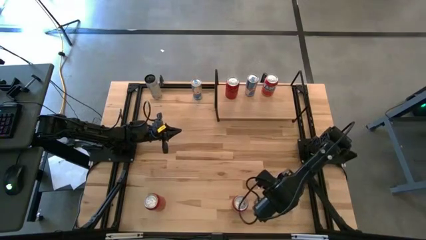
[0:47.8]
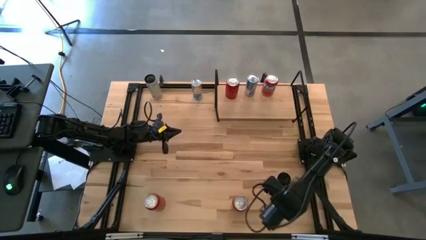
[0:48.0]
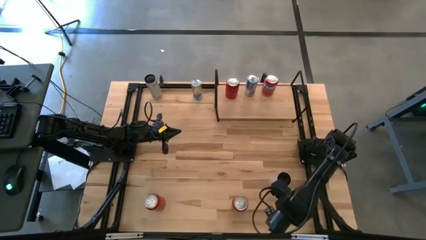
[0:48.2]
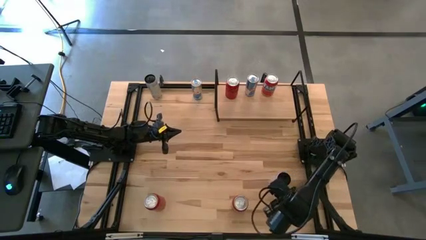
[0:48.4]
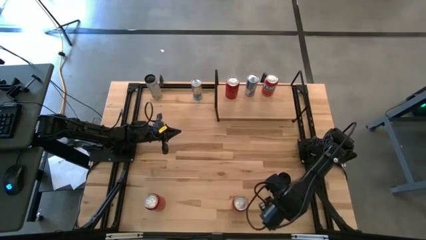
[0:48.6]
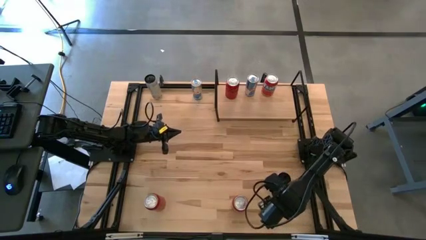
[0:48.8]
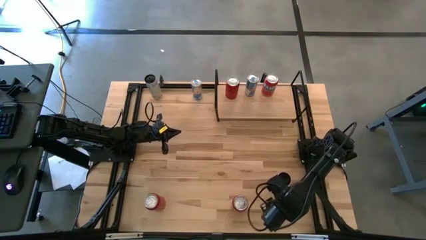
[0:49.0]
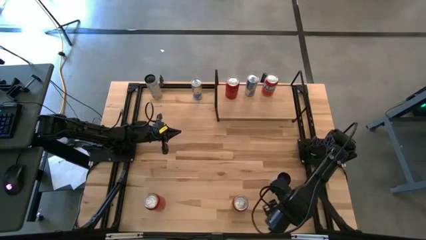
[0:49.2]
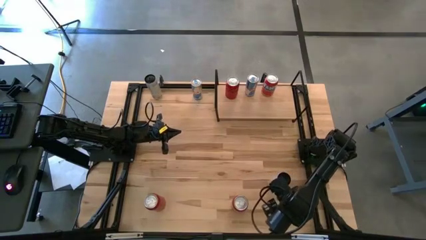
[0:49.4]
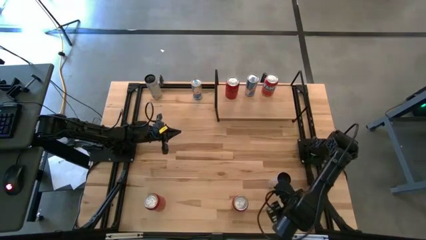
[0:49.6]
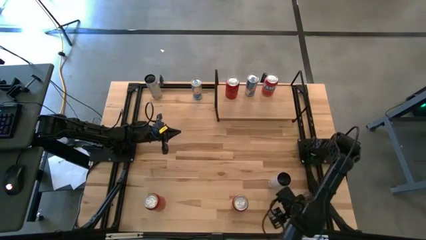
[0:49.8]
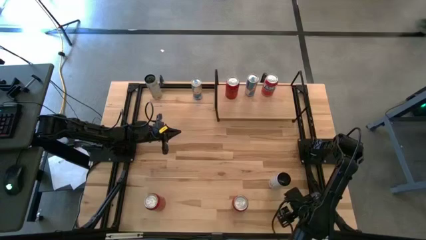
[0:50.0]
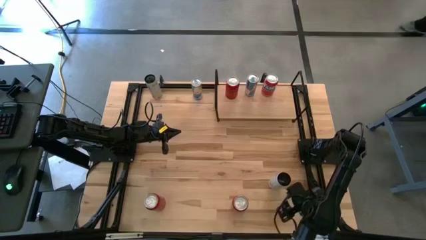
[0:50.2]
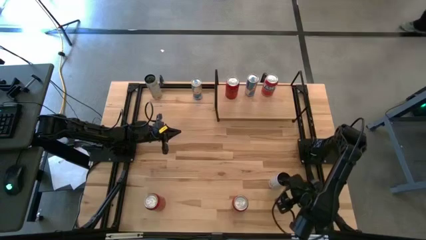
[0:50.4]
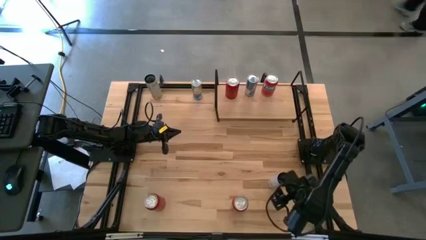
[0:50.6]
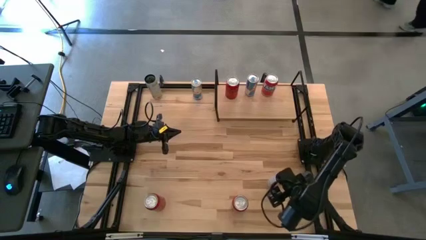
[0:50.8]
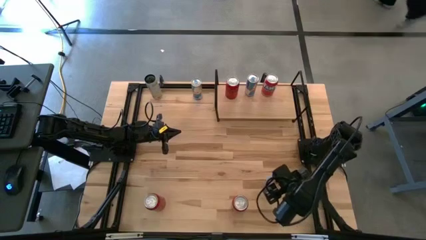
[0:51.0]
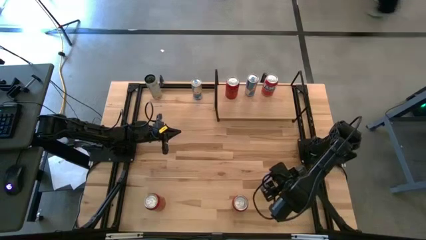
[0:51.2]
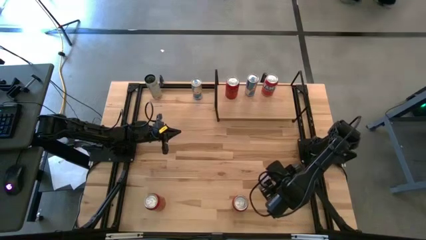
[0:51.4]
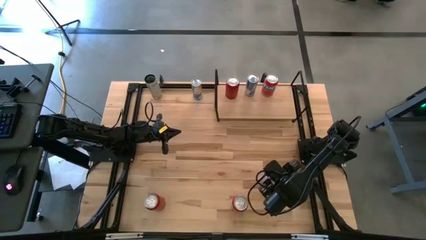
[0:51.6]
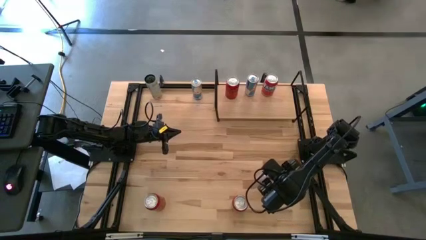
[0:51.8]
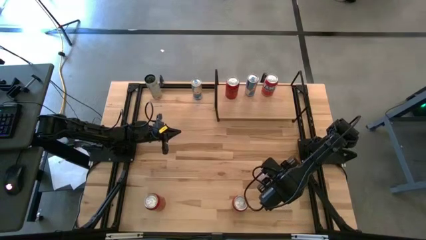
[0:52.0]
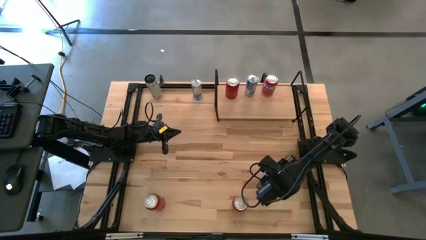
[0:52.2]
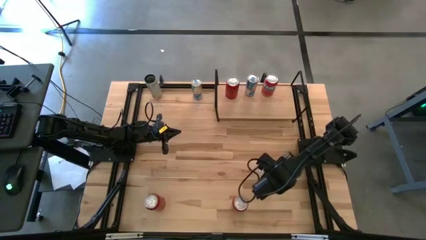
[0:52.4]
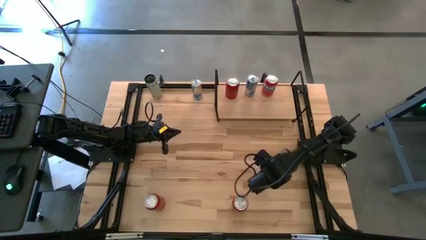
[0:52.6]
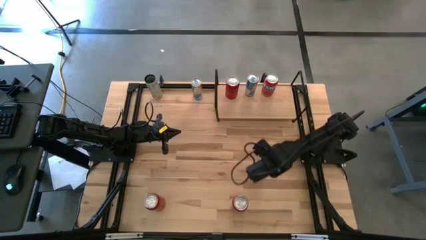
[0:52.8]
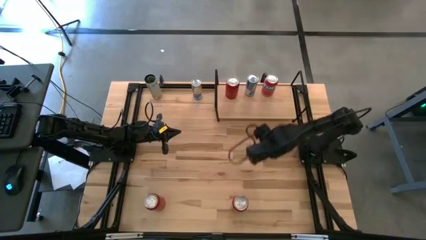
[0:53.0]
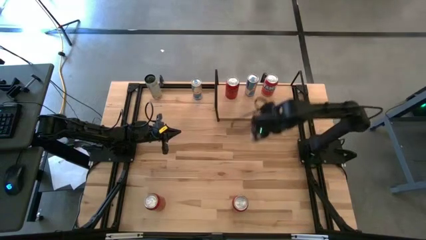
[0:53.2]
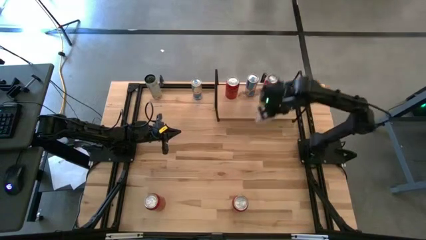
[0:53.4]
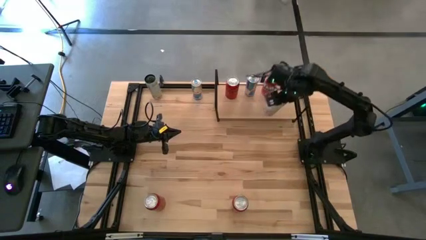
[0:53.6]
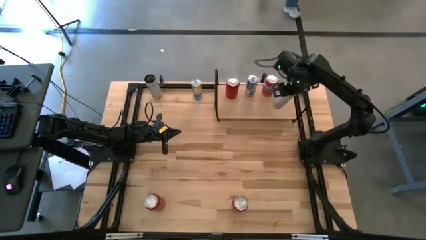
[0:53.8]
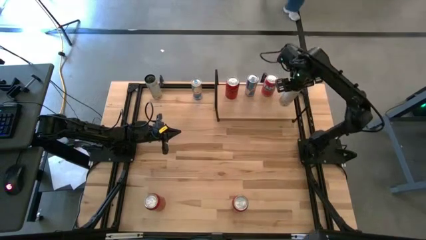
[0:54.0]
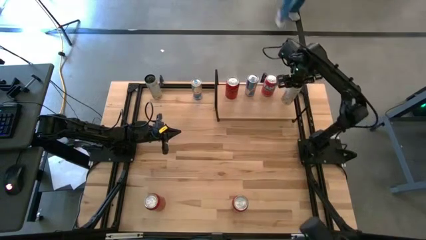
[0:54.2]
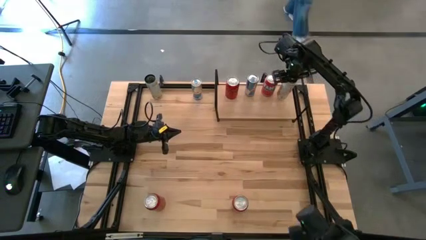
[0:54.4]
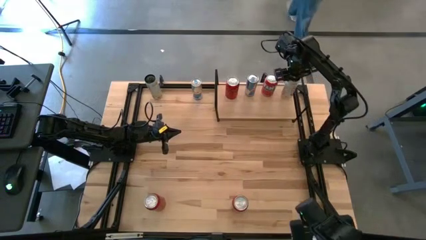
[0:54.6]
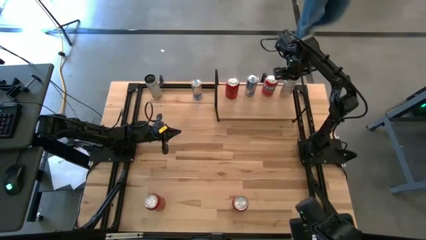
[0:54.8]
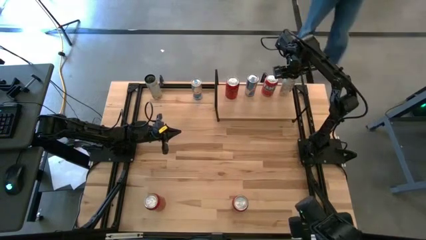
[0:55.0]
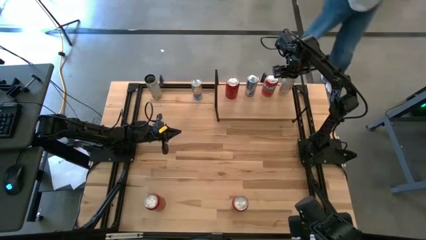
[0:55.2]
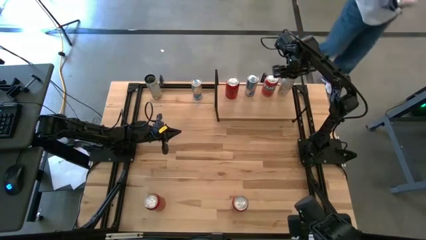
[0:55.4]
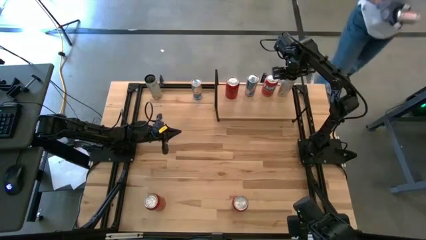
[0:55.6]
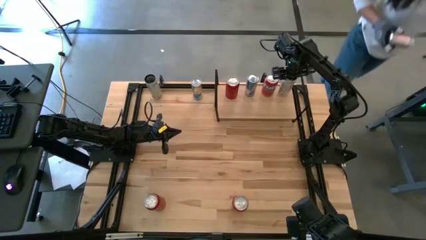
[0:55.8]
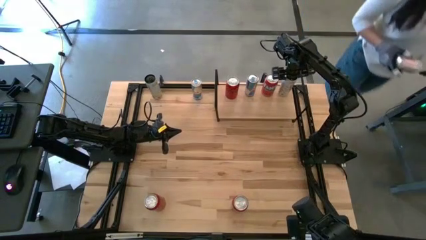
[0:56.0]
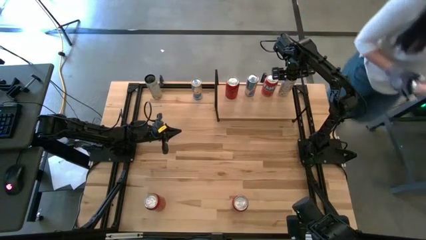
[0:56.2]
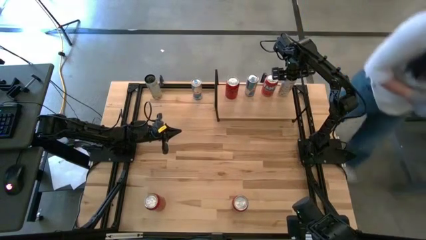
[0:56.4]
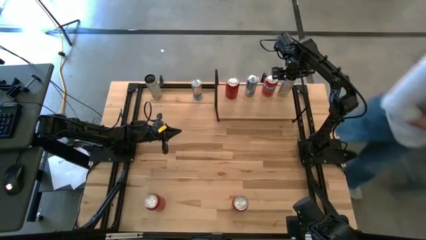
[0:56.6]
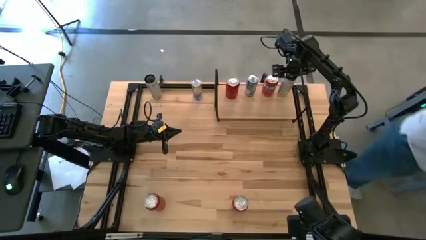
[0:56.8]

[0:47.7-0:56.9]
Task: Place canned beverage on shelf
Put the bottom white-yellow soda can on the shelf

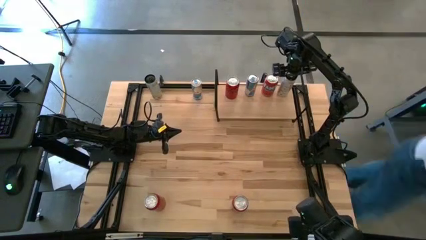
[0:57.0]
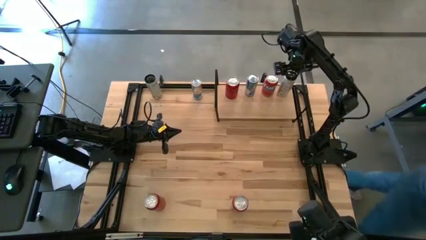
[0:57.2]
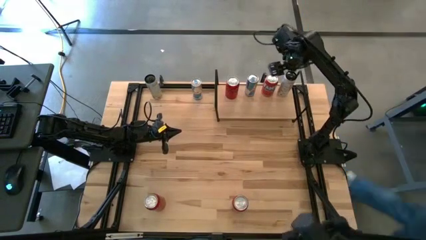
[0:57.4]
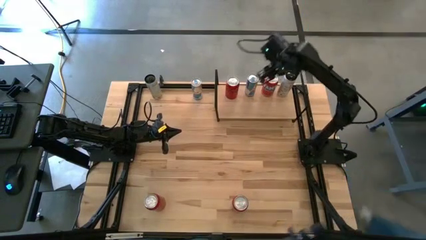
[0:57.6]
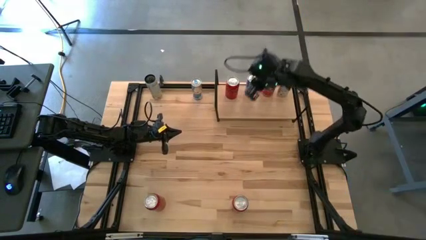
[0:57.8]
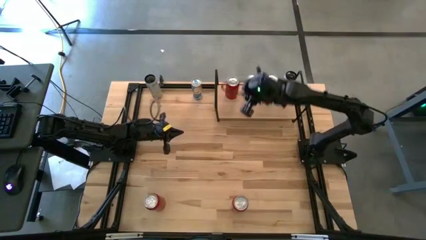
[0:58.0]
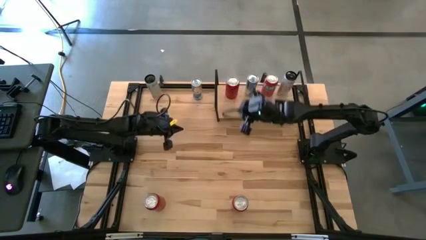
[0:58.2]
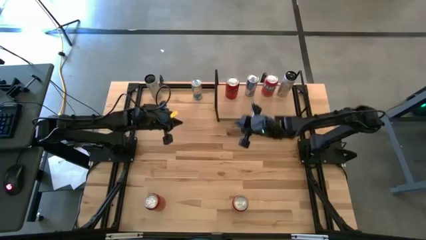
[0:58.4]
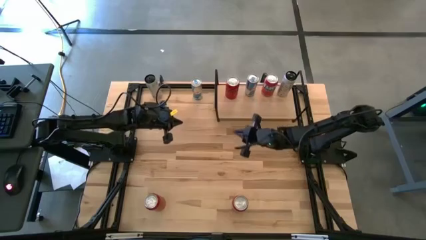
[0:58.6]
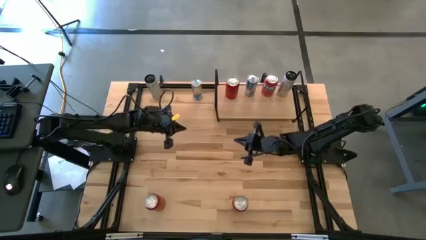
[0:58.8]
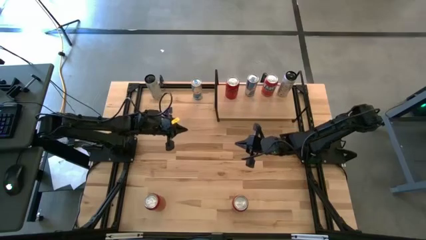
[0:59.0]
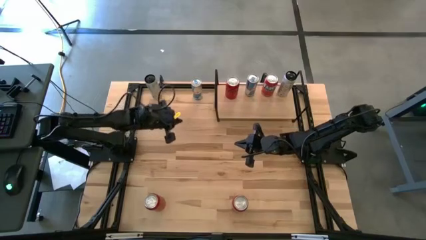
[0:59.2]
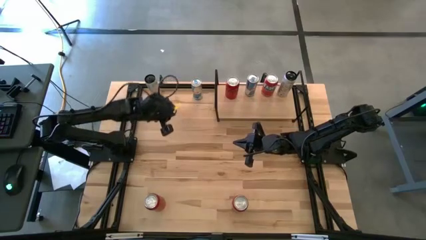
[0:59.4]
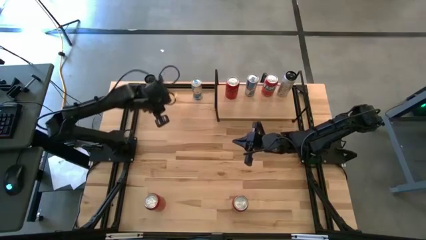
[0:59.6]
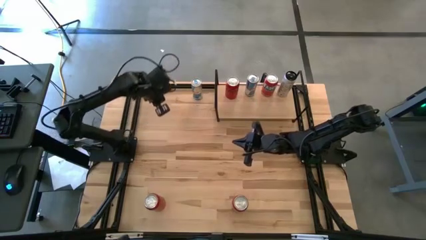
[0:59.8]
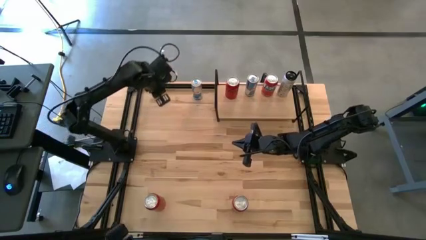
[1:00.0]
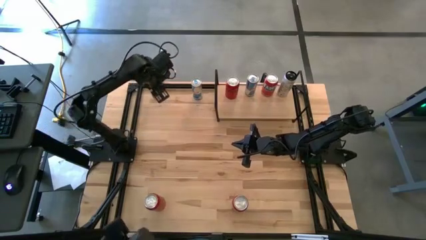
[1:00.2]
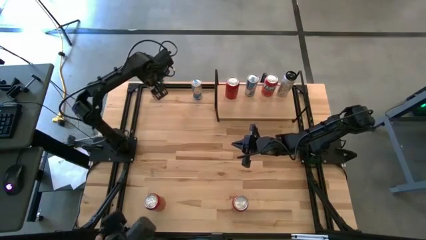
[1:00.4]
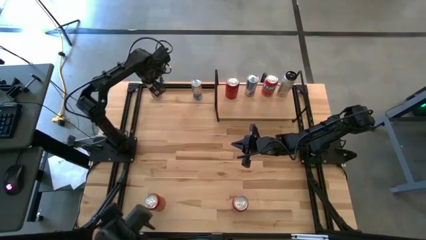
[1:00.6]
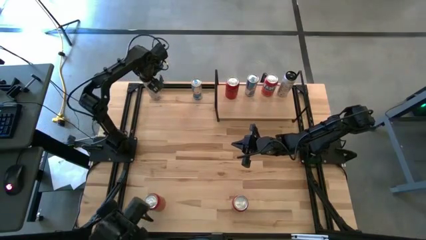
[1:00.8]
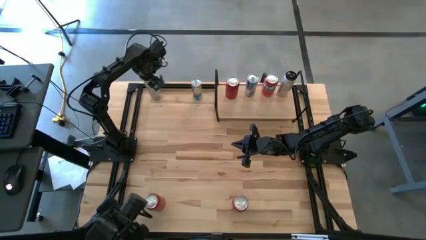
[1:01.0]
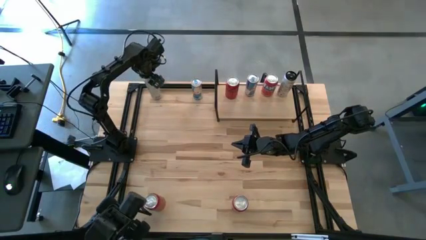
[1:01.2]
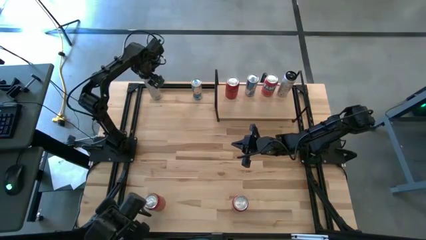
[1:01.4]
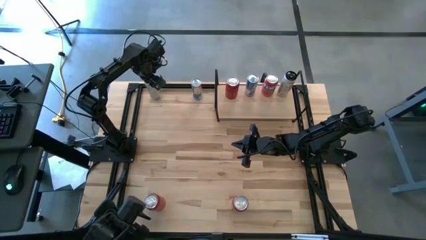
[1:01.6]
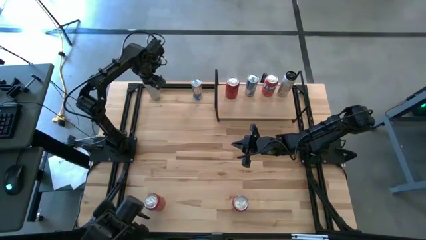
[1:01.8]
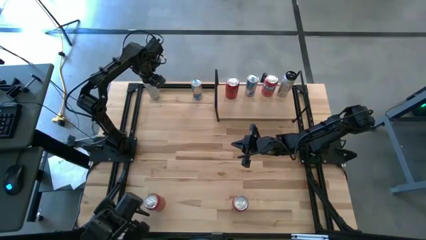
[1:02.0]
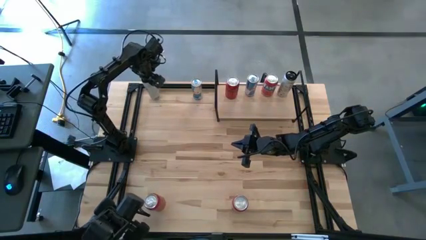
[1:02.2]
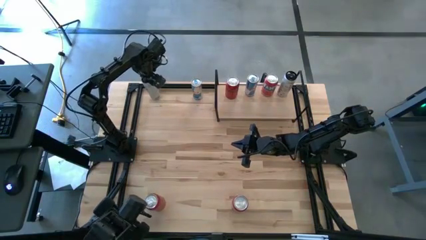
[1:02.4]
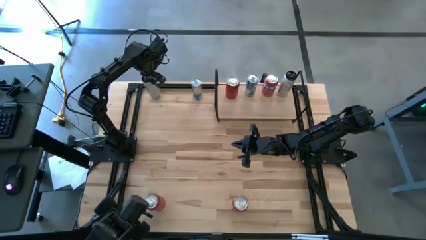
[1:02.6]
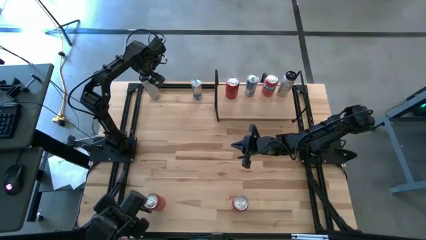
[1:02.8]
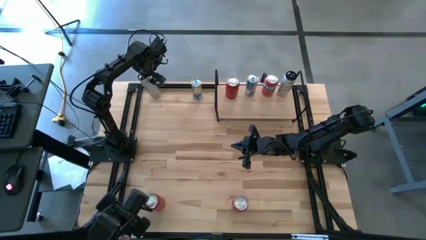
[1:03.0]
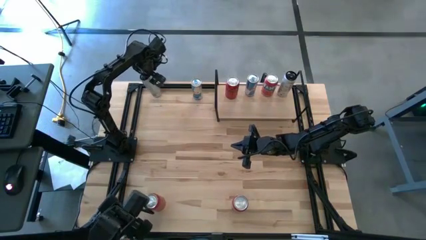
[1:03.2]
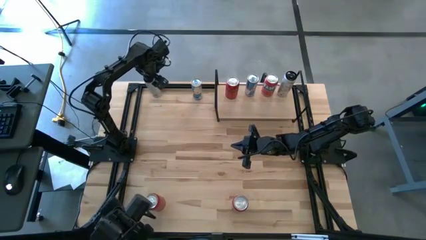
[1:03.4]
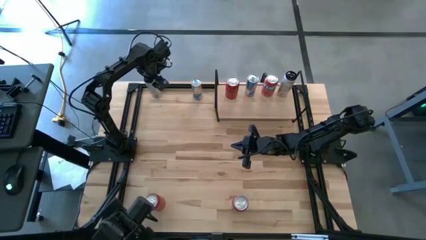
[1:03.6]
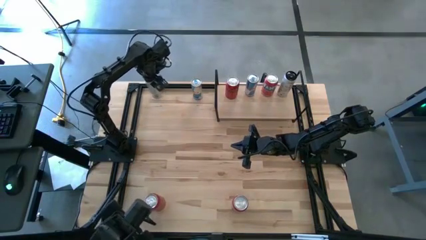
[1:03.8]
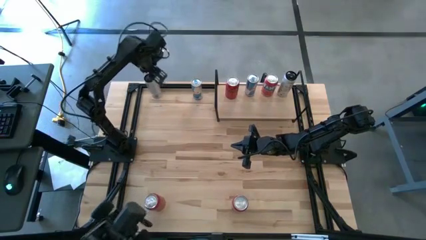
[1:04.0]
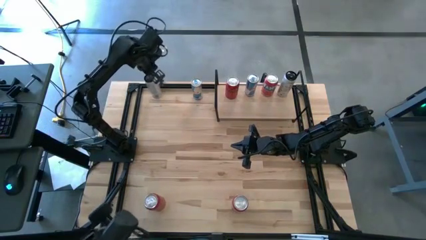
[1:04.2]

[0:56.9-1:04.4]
Put the white-yellow soda can on the shelf aligned with the other white-yellow soda can
